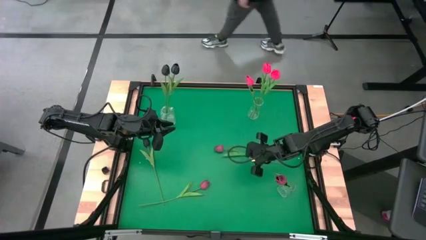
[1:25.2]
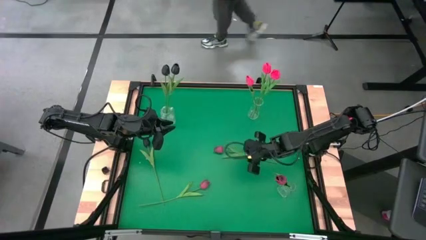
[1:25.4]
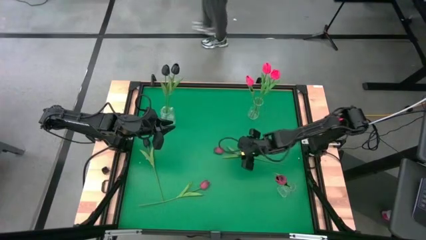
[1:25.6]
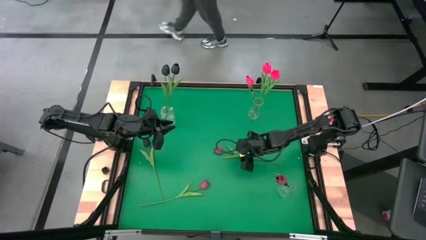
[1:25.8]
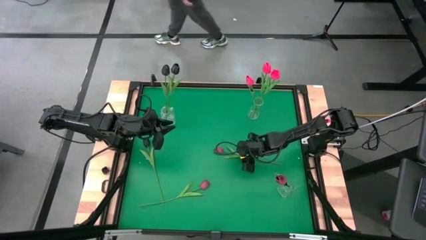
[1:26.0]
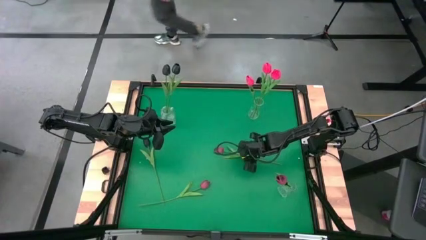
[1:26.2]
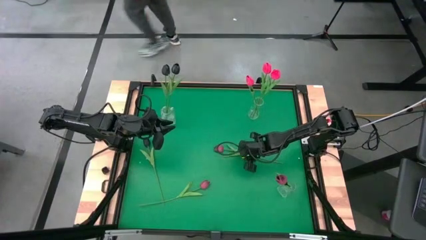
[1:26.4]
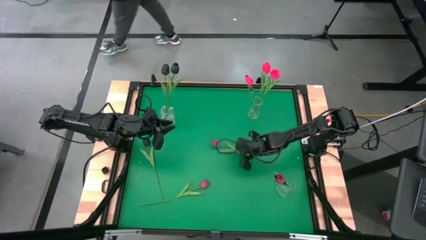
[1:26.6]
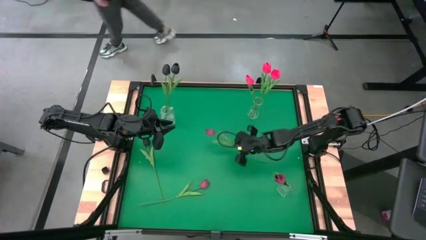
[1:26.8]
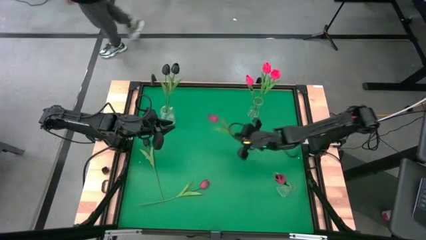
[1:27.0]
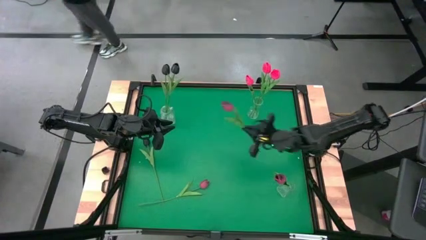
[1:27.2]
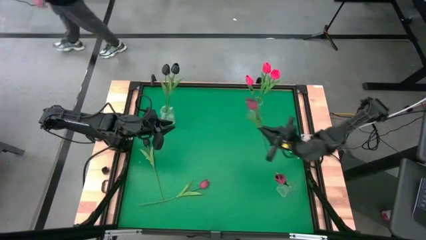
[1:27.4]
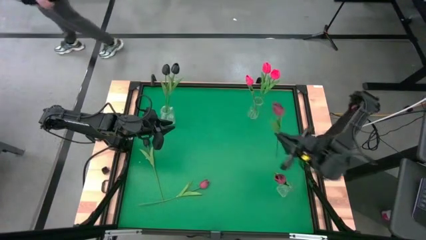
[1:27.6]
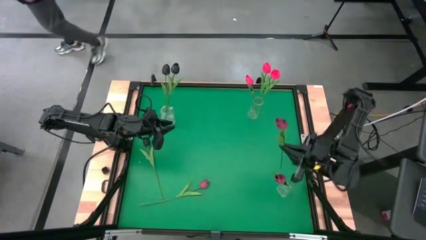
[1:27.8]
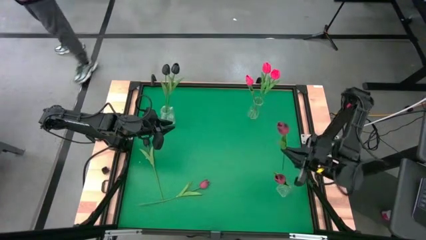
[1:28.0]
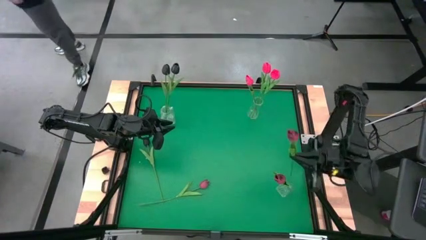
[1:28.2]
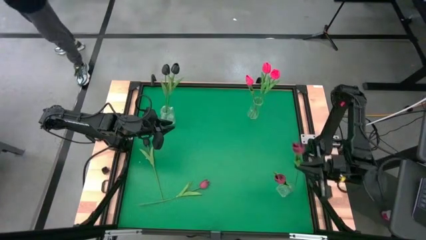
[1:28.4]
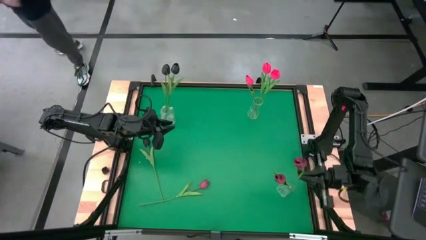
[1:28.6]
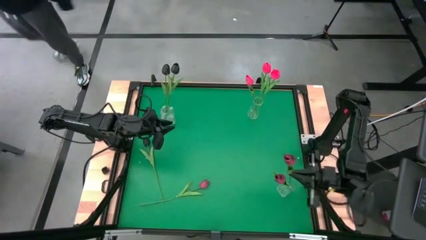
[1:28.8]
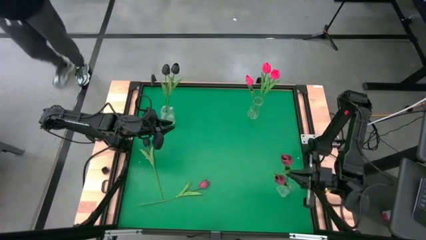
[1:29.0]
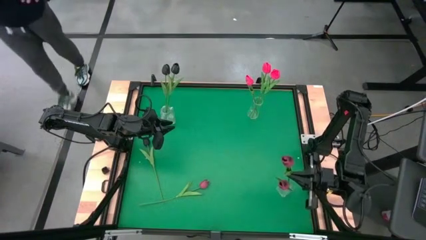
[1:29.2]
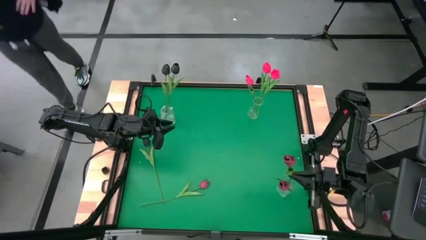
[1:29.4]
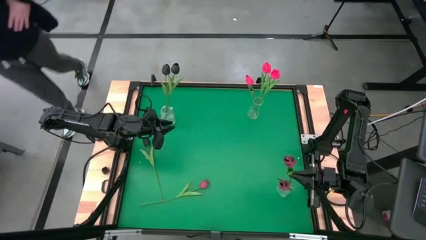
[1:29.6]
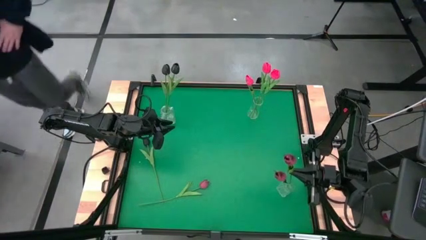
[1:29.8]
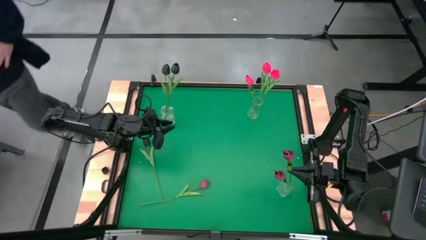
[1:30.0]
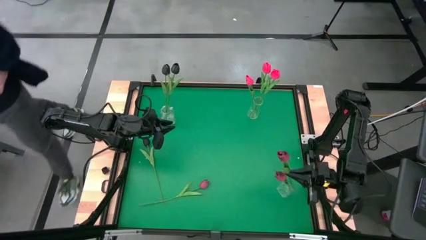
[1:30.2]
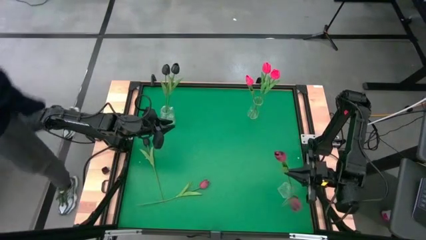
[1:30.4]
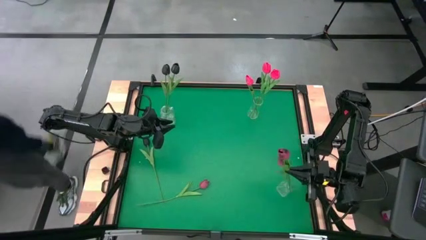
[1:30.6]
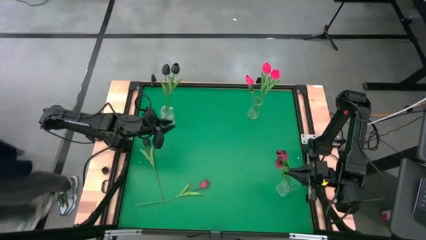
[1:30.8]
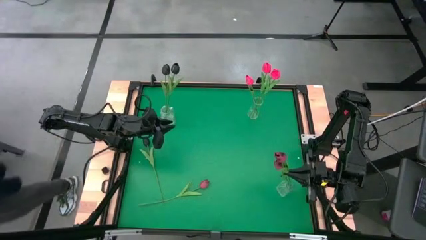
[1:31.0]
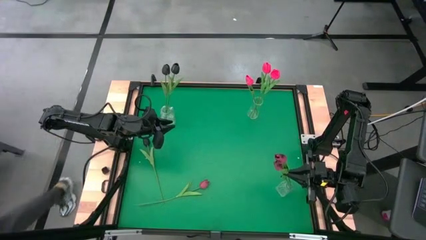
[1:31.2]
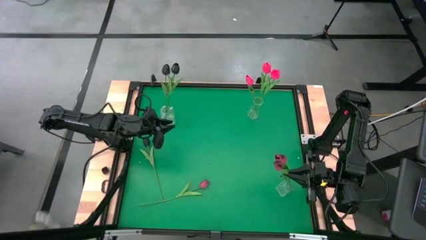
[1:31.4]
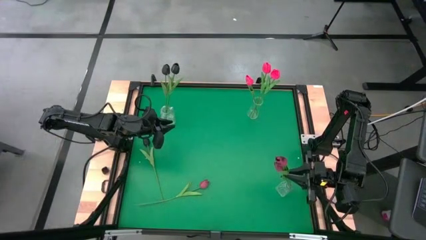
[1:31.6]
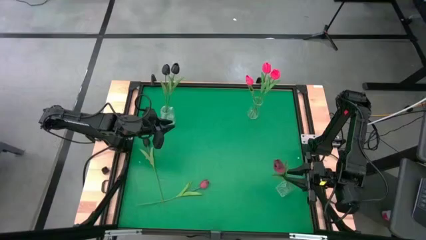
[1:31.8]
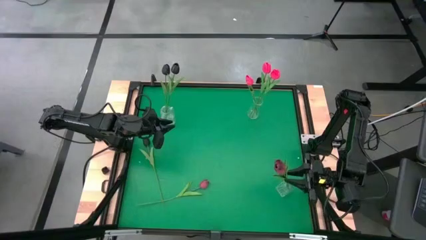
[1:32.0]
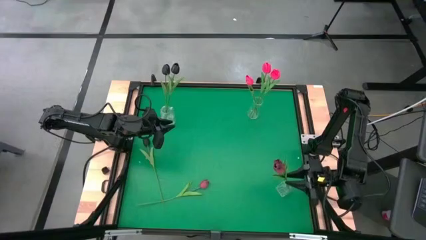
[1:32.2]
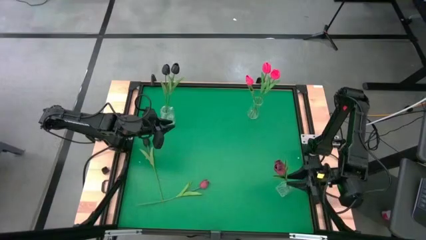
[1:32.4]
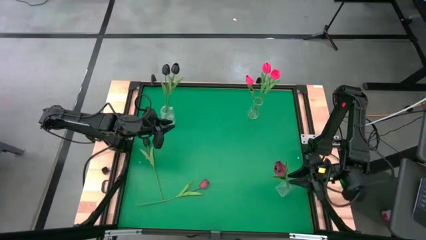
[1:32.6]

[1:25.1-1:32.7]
Task: Sort flowers into vase by color
Put the right red flower into the bottom transparent vase

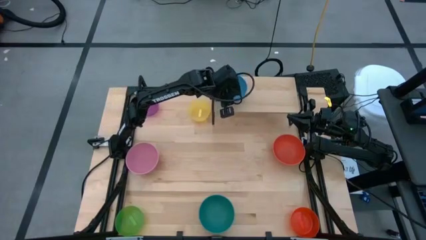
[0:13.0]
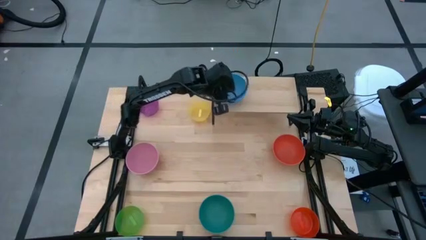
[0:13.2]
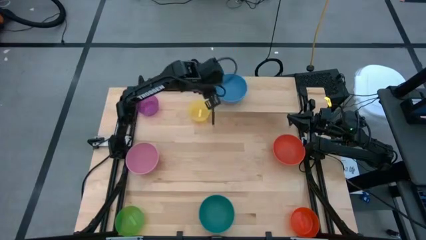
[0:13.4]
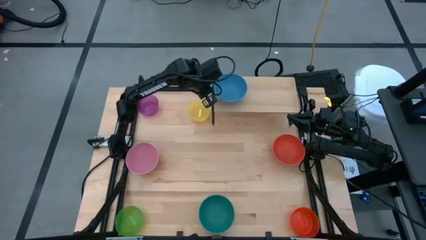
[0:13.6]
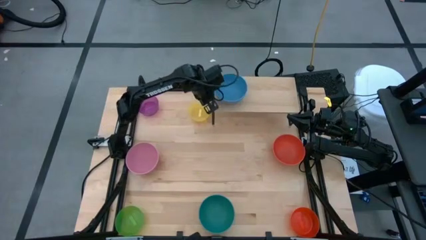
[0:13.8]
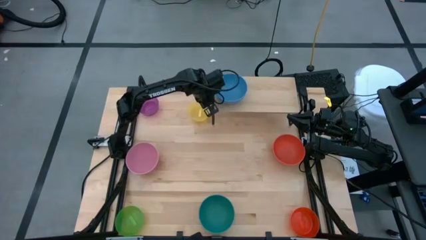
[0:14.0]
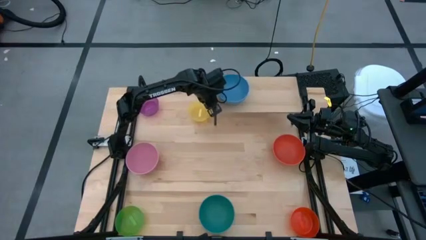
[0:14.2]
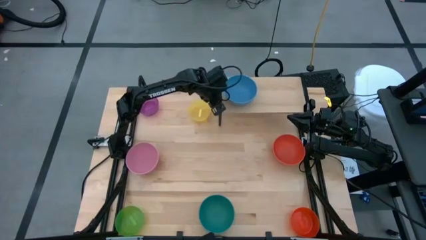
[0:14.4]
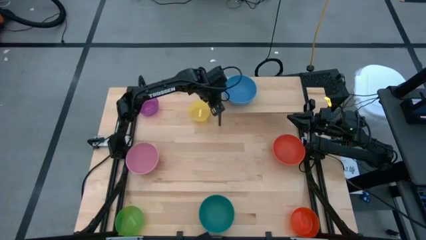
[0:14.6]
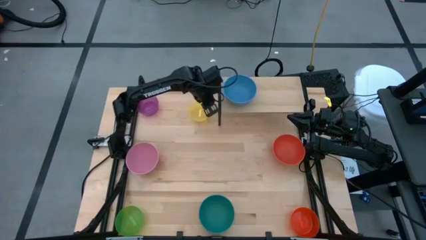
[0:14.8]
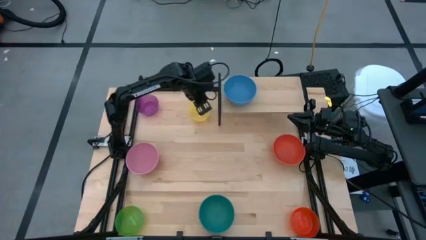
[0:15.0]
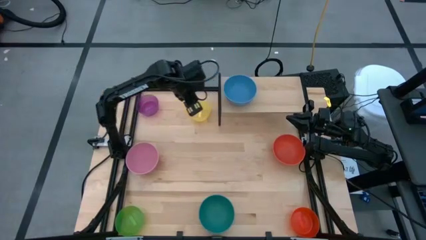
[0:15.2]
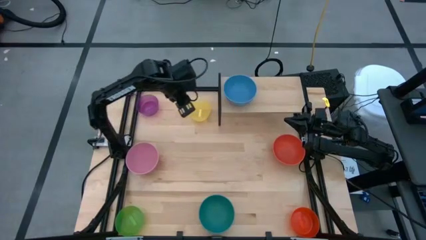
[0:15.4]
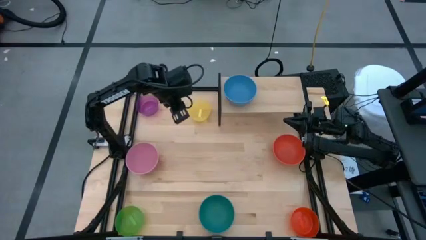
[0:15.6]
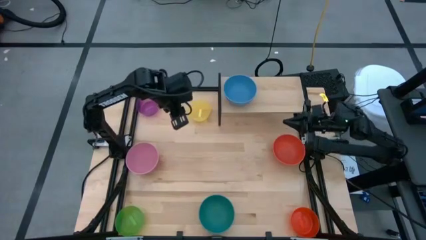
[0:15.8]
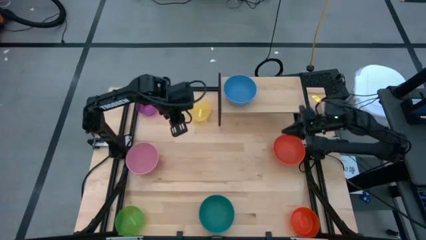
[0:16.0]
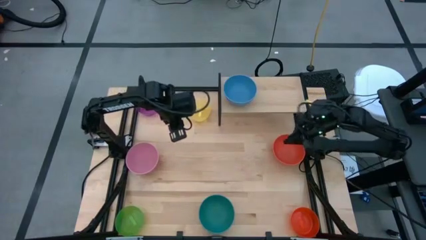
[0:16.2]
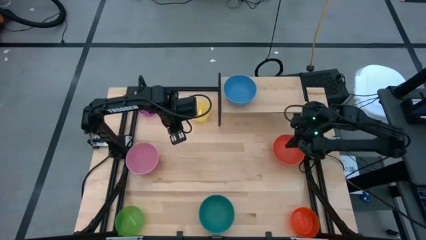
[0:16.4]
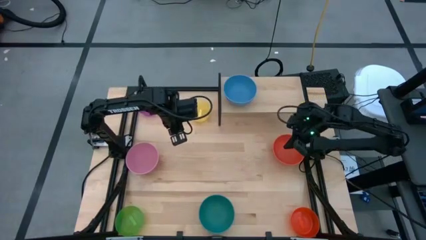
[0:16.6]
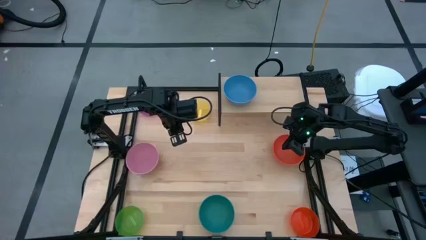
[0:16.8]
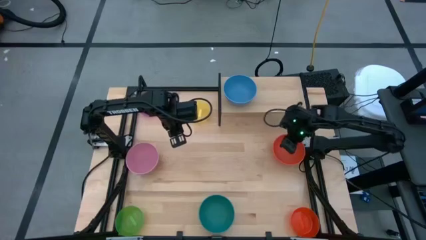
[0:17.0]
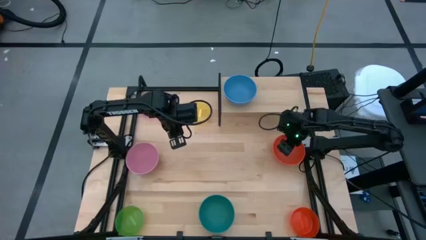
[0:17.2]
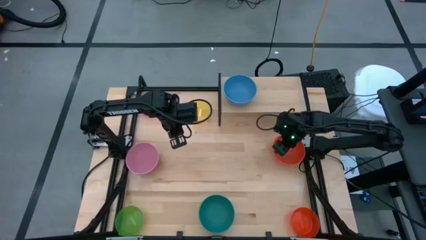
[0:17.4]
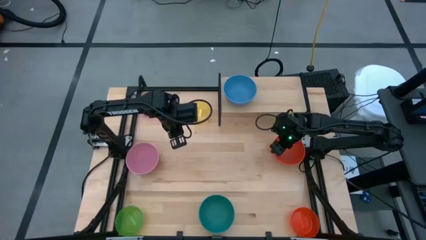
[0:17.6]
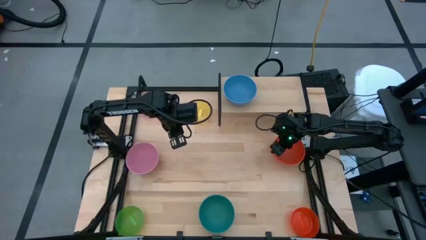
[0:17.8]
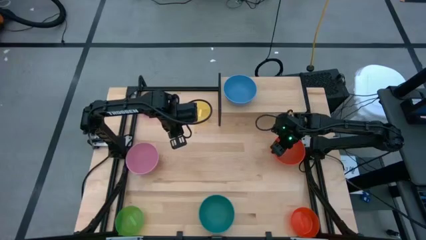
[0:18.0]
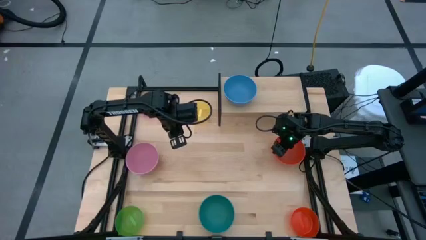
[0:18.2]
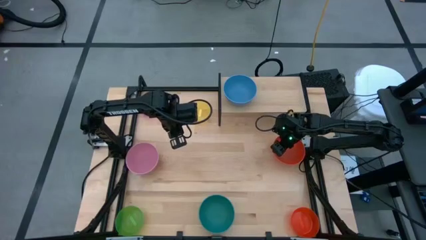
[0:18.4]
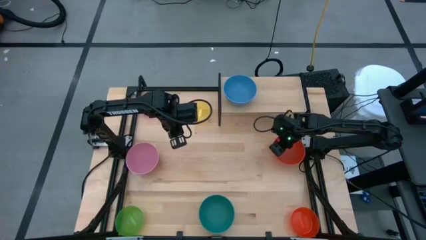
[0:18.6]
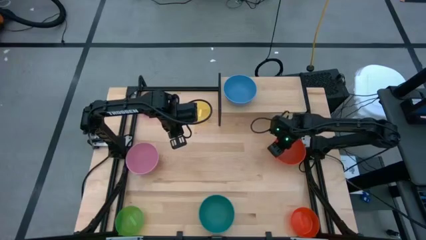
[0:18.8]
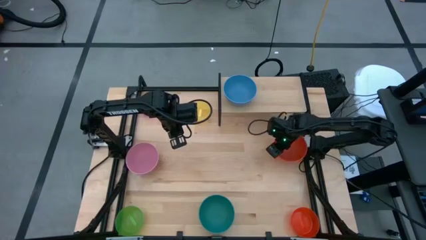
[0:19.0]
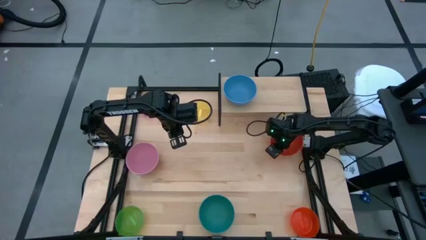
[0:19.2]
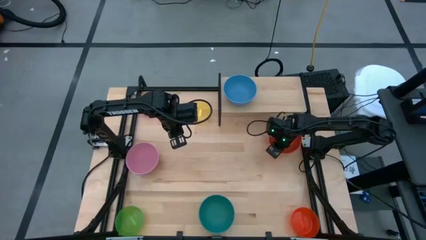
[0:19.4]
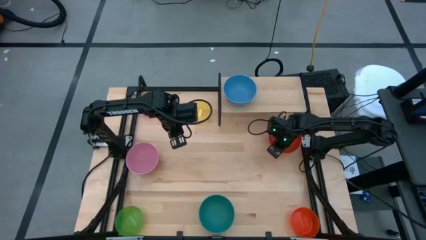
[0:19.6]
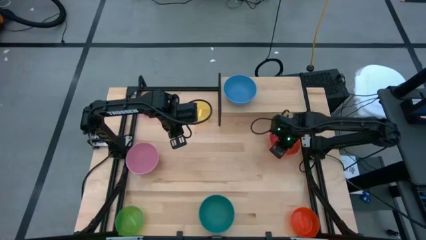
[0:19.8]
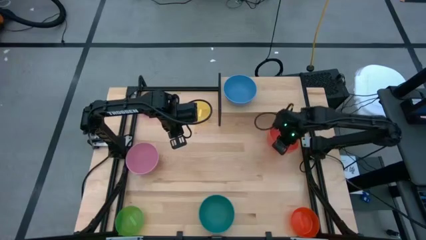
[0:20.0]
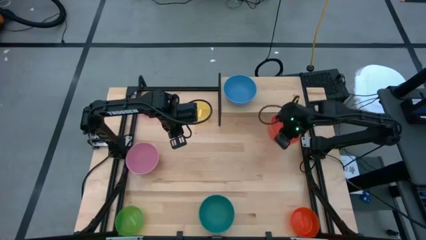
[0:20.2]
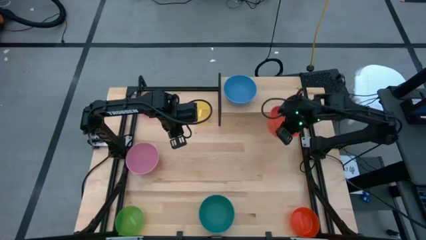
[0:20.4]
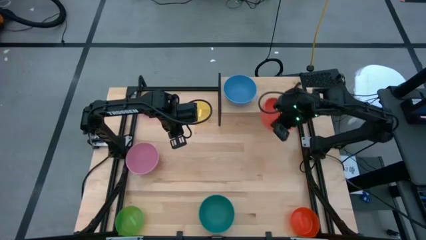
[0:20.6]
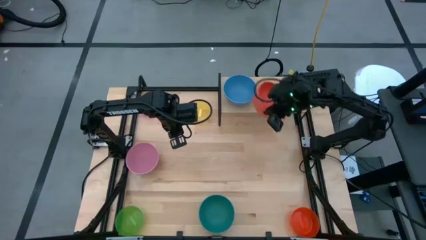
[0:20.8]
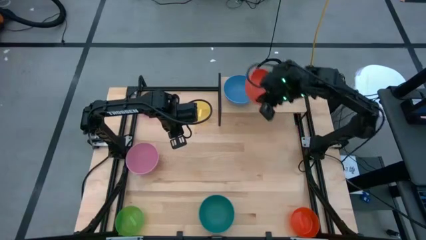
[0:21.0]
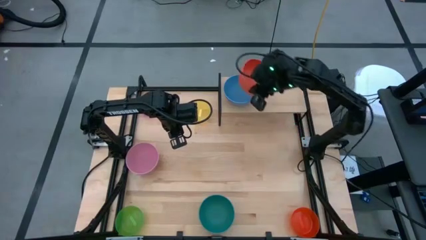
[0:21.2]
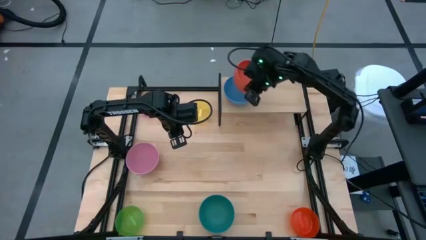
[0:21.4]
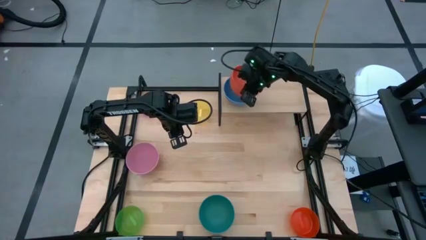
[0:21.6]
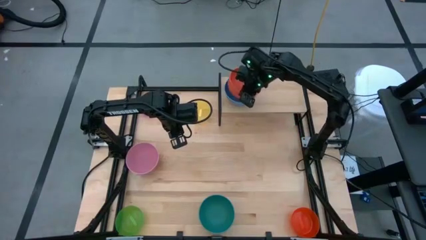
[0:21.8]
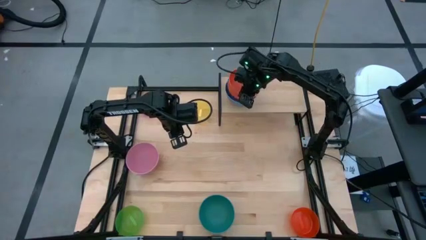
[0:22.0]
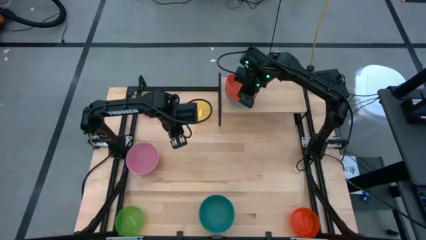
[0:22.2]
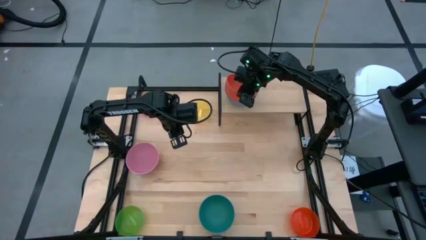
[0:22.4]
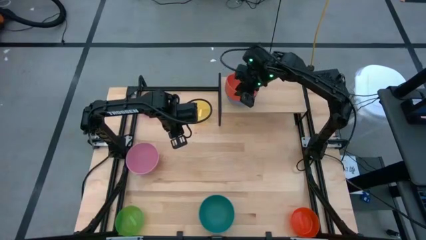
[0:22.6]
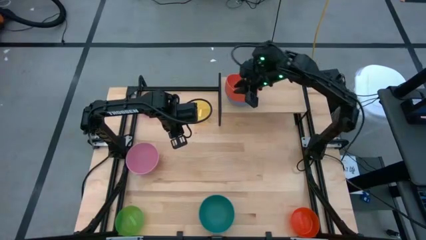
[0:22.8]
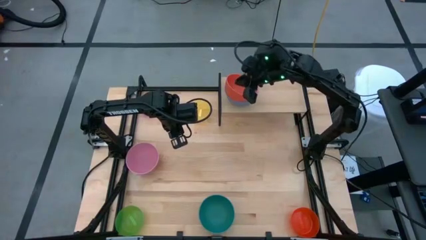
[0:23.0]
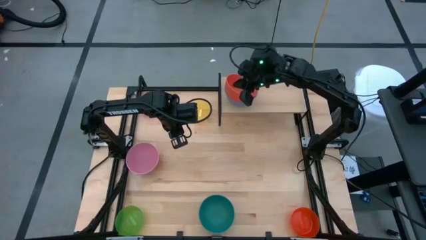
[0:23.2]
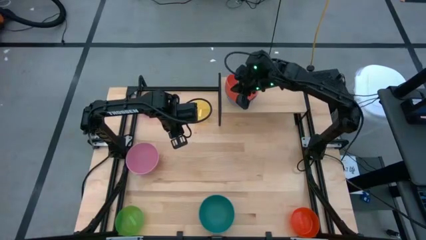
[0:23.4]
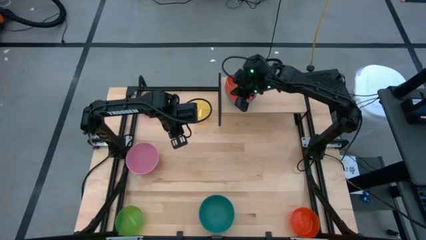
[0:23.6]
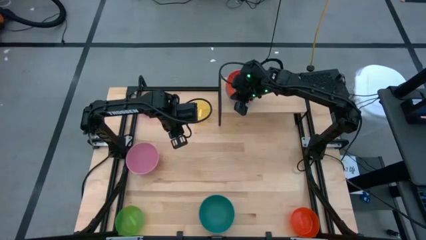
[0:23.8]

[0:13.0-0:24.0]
Task: Place and stack bowls onto a shelf
Stack the orange bowl on the shelf
